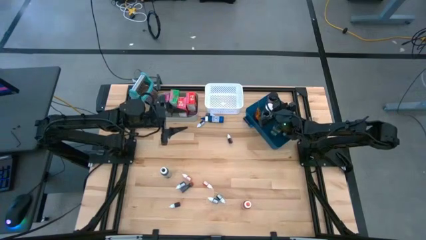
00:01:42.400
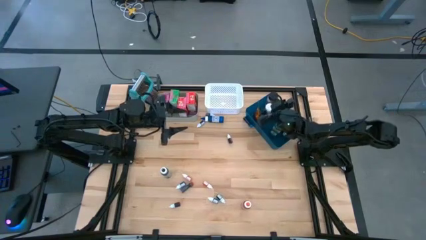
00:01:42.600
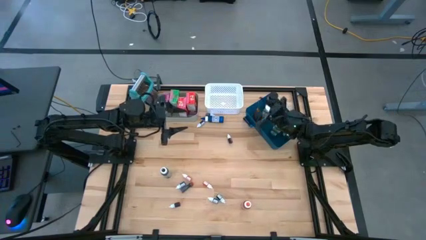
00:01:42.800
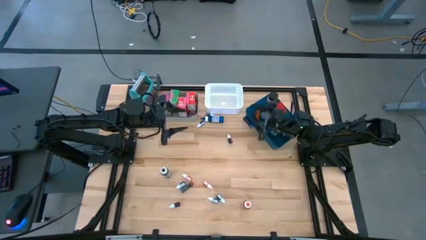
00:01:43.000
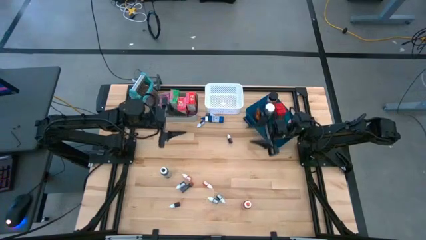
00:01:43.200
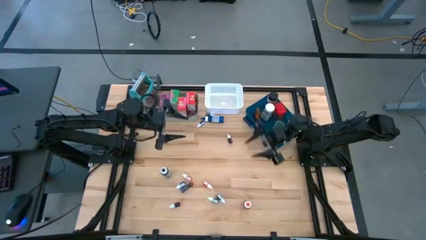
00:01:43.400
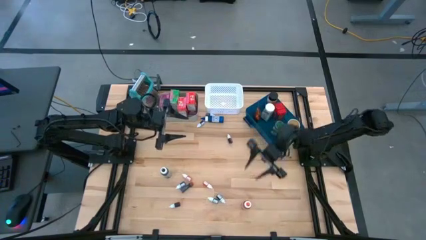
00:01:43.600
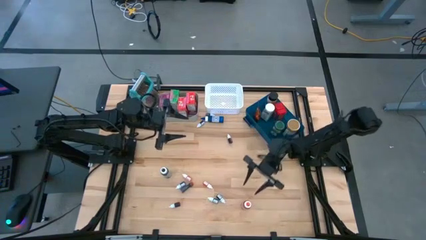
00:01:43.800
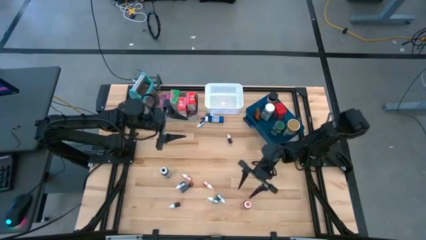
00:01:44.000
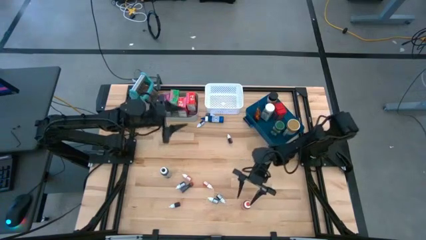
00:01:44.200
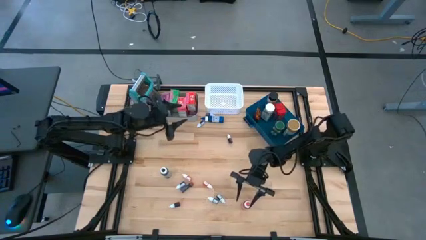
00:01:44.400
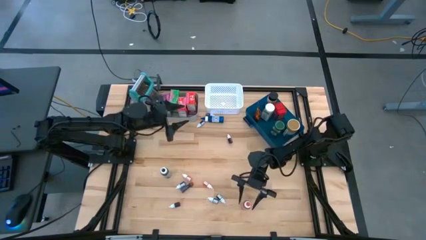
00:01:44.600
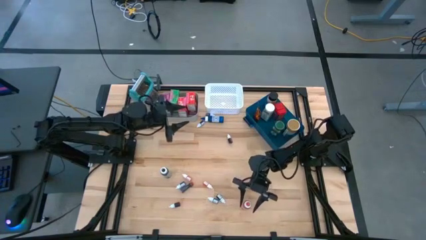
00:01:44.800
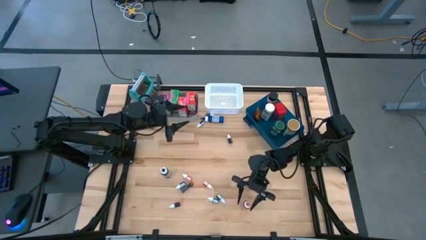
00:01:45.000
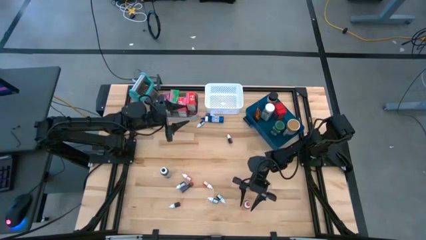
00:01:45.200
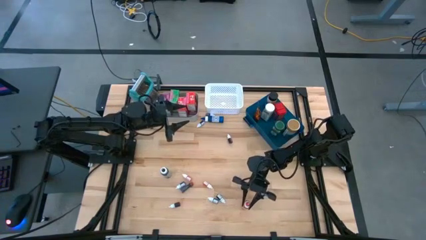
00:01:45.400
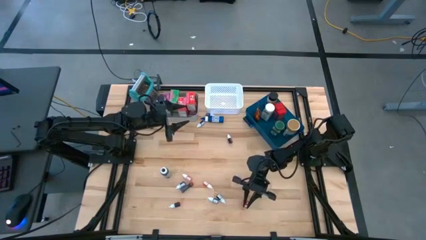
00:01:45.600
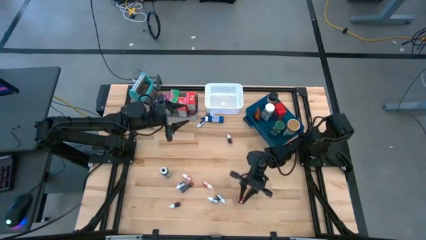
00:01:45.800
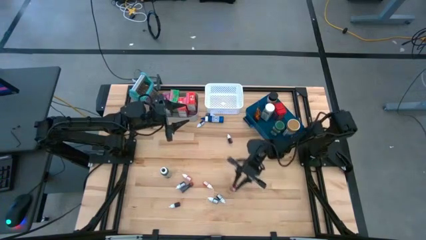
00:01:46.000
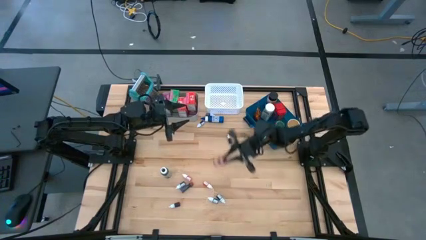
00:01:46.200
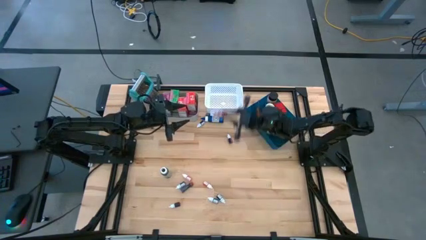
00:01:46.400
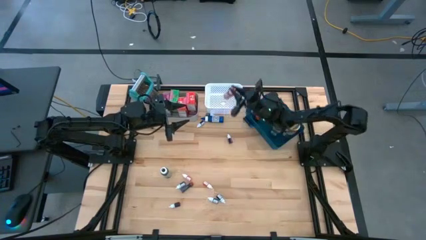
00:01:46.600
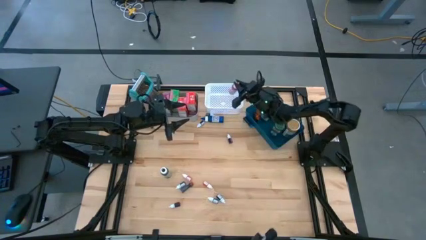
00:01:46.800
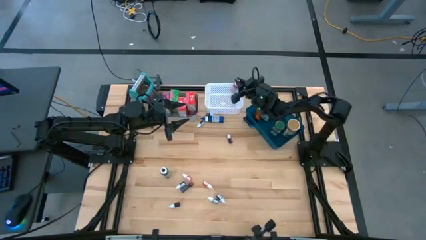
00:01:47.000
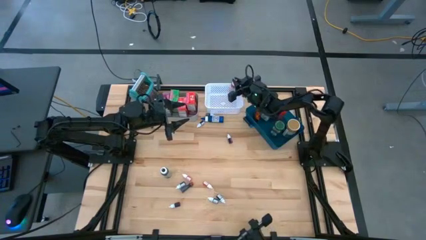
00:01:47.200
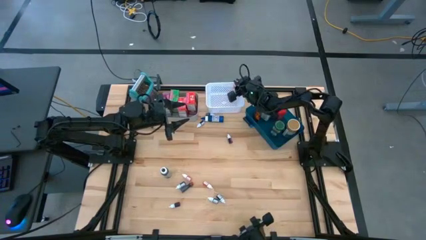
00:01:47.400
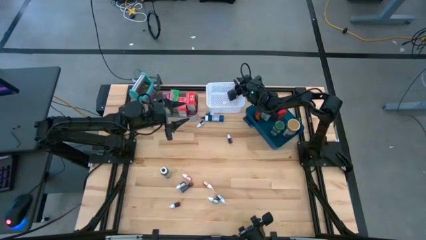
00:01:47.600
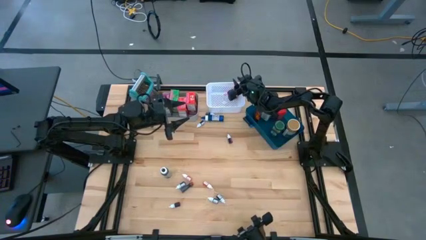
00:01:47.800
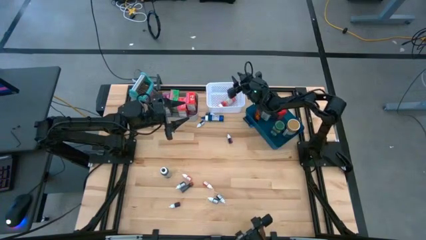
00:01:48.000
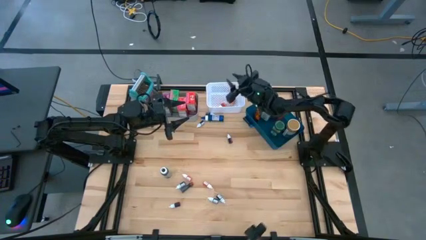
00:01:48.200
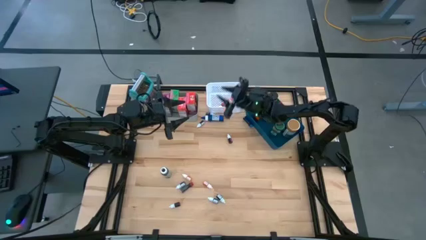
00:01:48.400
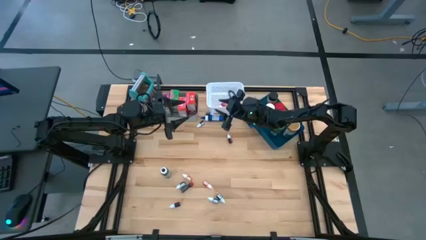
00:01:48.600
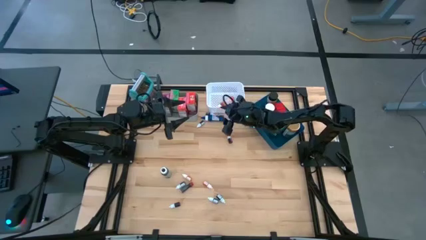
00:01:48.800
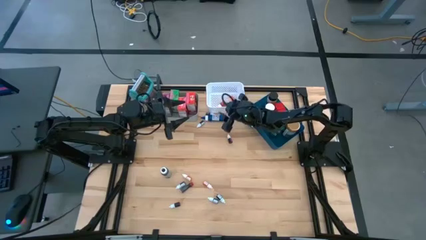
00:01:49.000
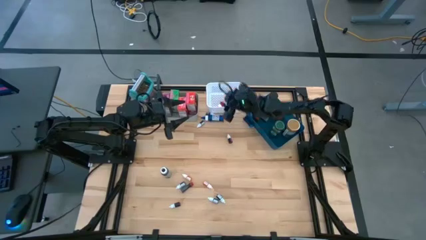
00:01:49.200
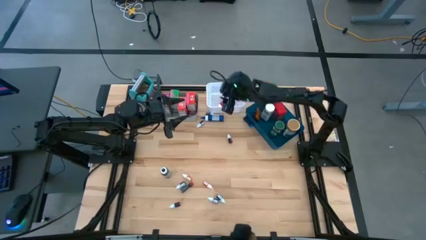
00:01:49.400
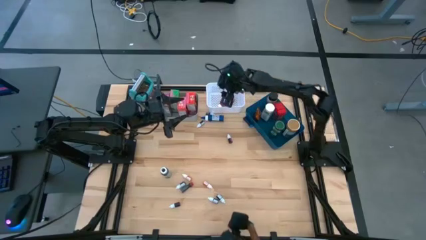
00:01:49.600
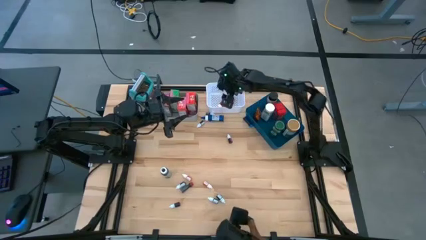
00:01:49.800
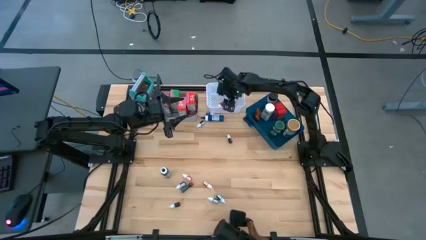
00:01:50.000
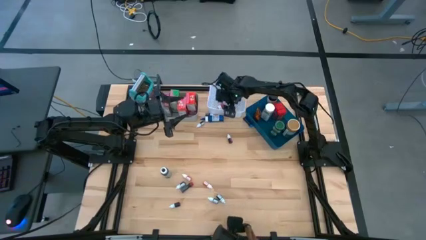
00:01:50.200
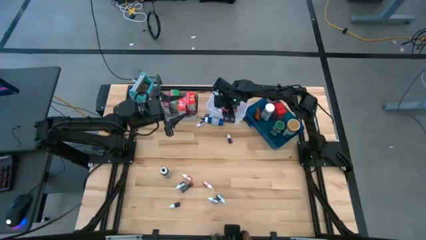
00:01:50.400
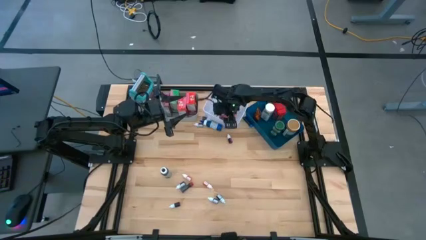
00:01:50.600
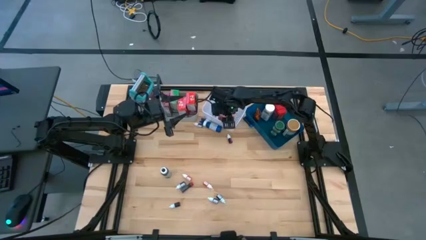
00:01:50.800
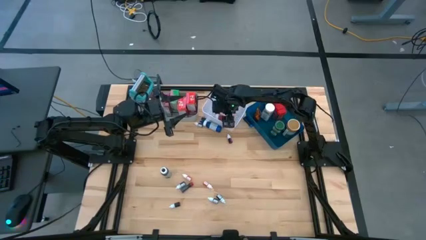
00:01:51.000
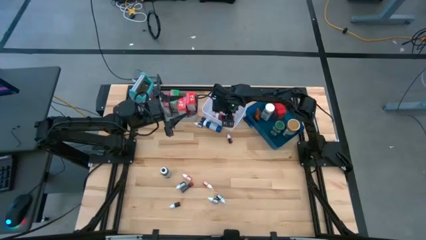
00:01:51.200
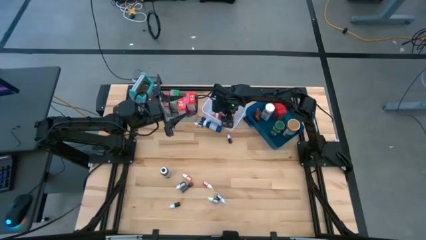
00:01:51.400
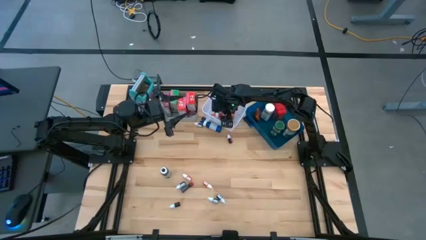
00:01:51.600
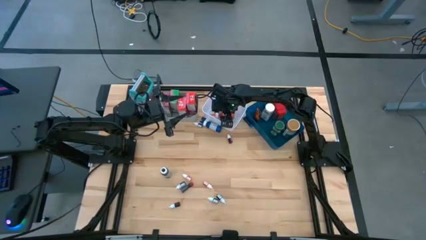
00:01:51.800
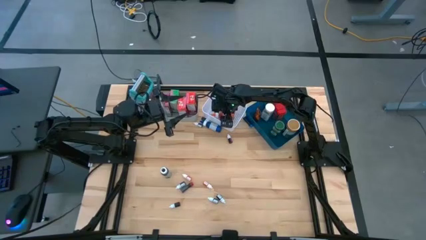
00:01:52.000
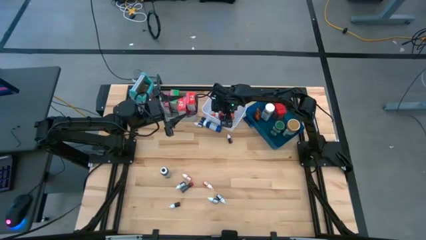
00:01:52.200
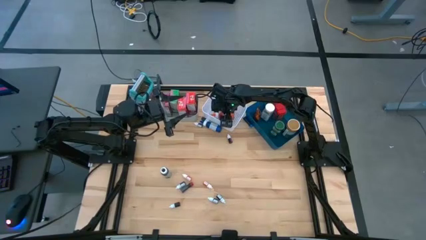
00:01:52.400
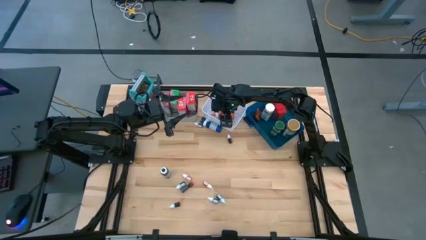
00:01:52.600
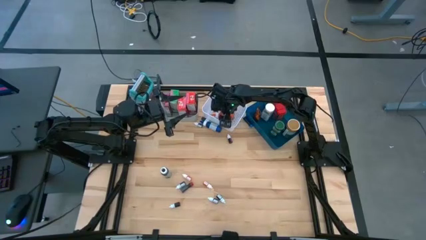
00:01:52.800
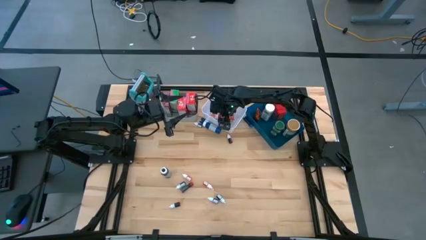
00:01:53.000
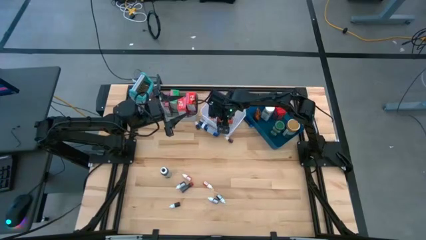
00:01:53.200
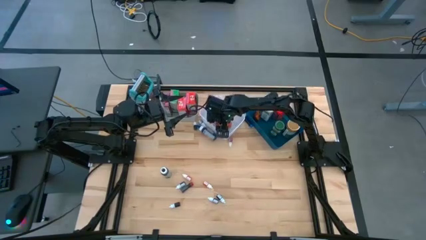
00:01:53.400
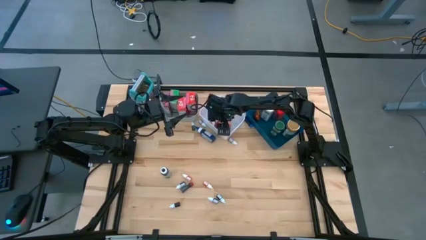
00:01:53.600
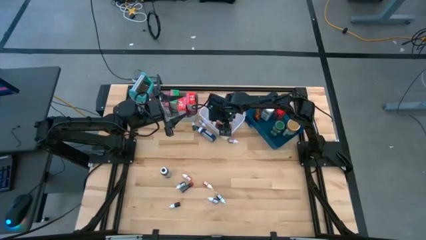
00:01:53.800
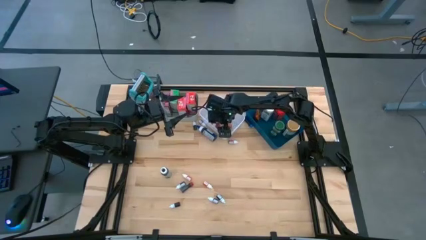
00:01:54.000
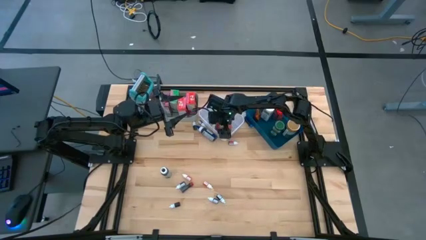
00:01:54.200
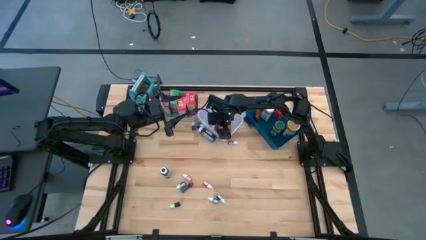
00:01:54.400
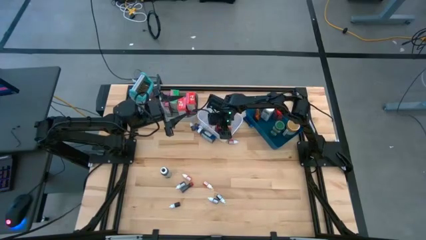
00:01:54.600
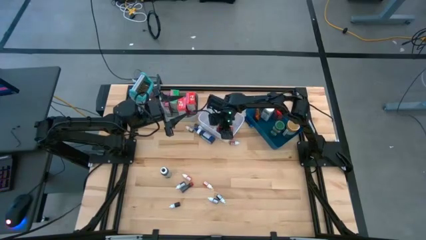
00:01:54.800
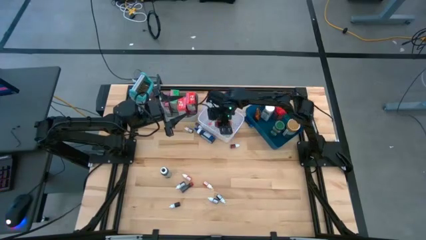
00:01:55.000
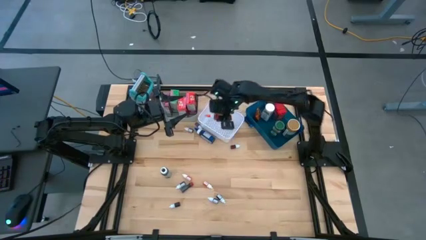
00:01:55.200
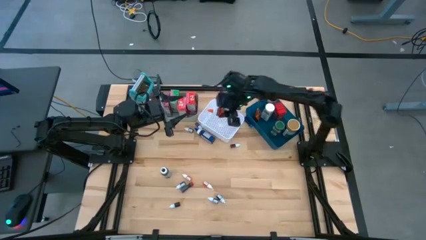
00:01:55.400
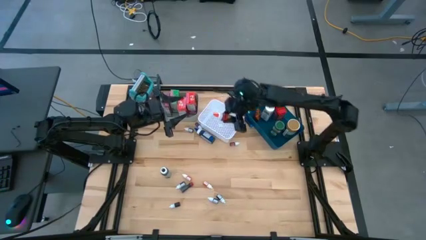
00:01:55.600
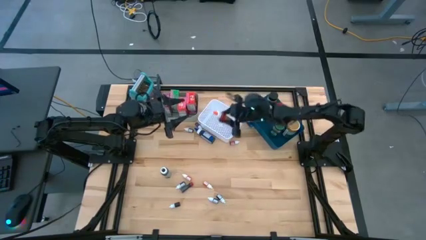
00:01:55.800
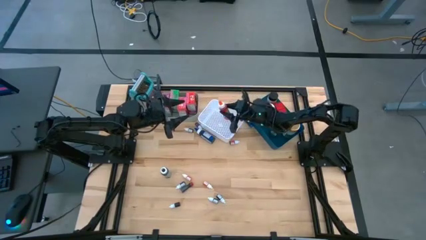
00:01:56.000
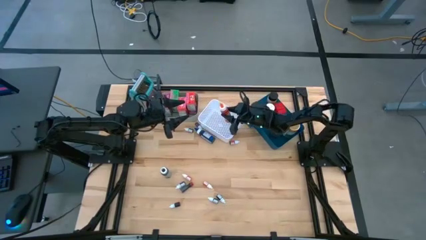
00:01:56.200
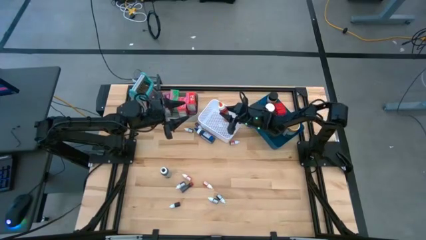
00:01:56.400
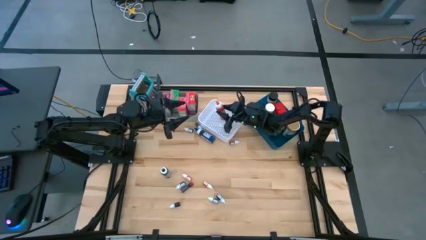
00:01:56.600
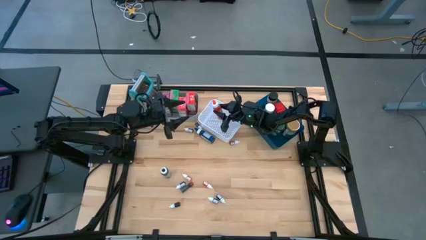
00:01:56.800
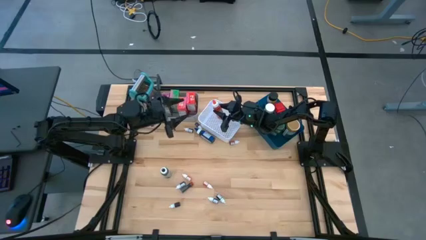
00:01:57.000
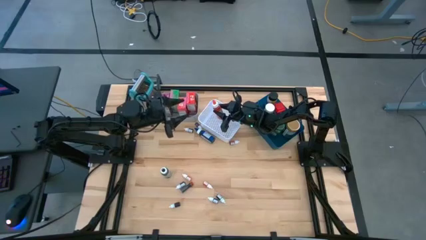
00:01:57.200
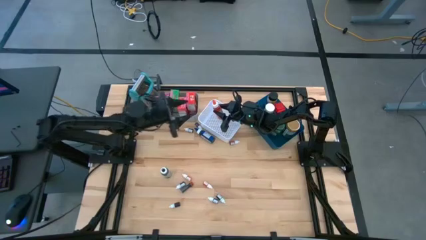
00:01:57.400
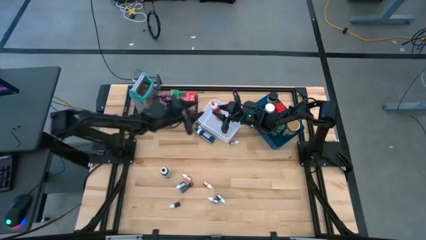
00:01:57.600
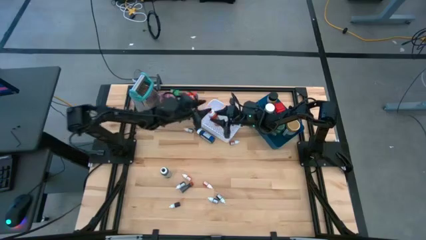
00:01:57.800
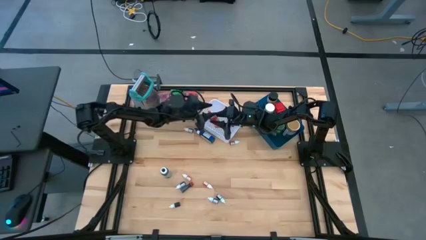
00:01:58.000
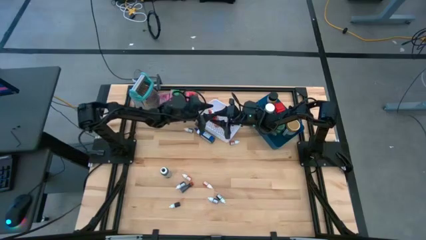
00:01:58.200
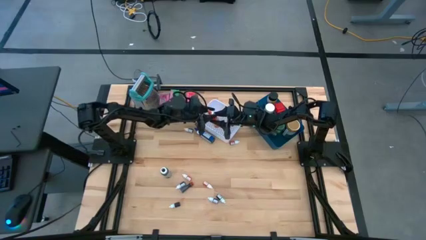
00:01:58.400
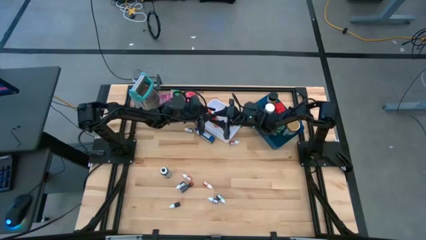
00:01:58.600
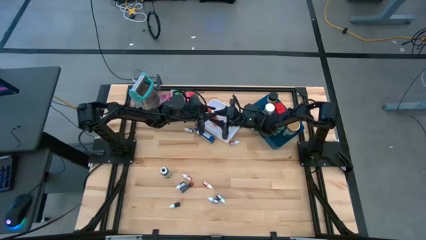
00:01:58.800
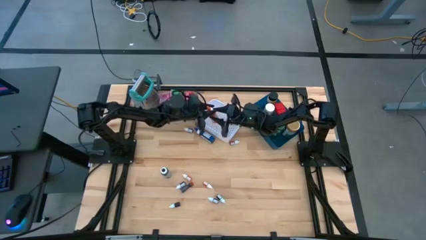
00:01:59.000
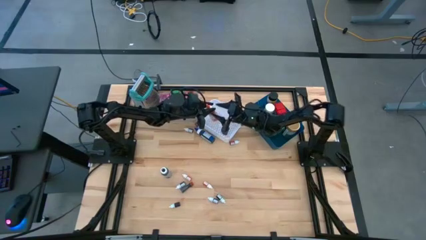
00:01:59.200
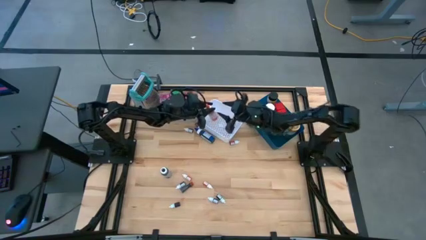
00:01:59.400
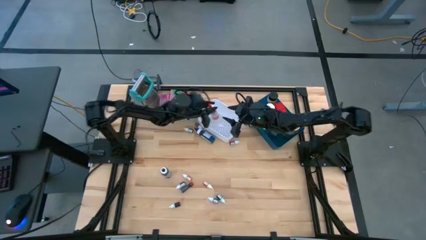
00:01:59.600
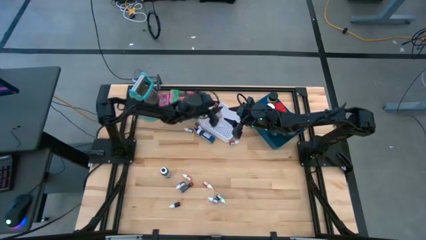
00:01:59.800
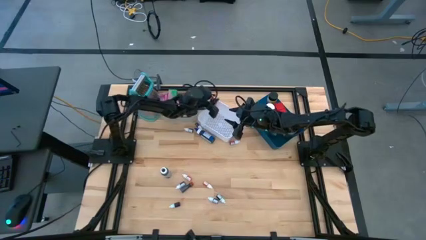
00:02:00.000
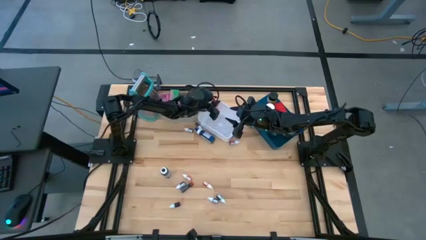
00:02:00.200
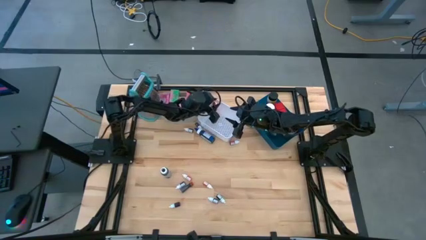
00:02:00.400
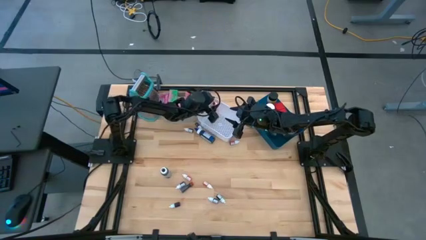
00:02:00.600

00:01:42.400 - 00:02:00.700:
Task: Pick & Place Kitchen Items
Put the large orange food coloring bottle into the white bin
